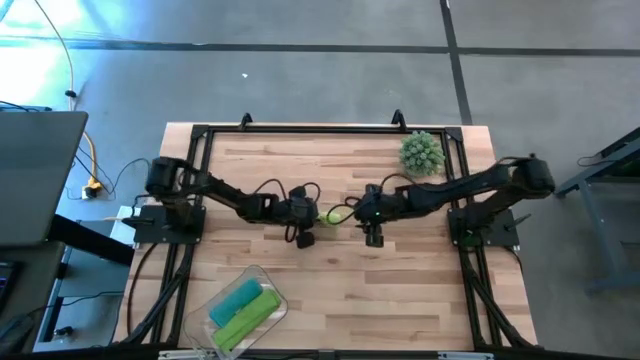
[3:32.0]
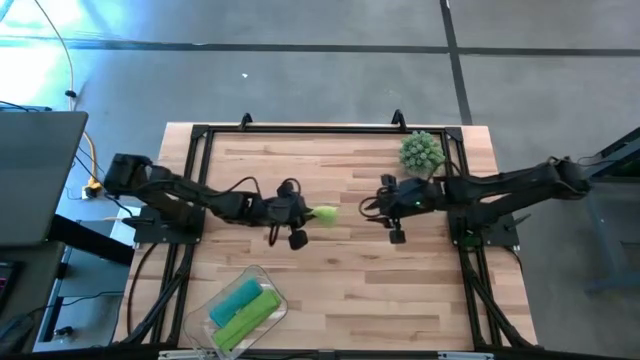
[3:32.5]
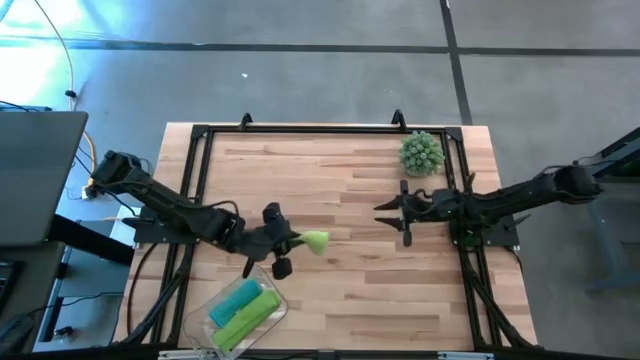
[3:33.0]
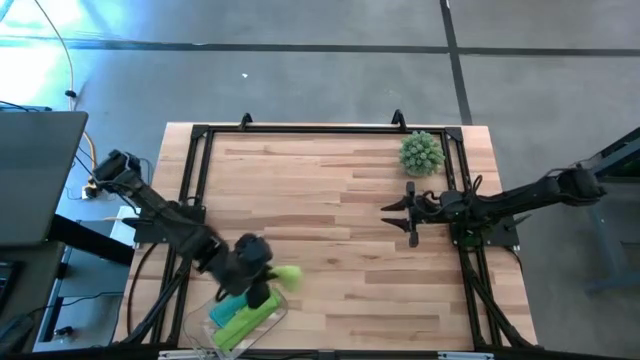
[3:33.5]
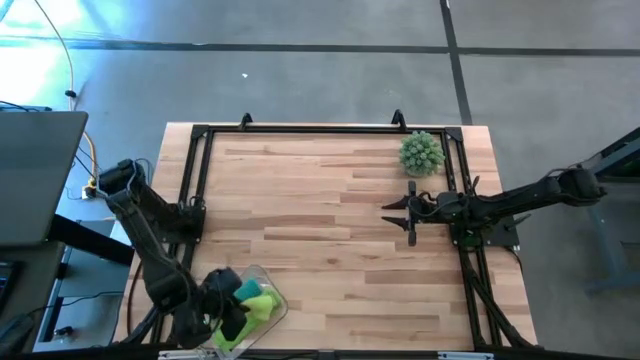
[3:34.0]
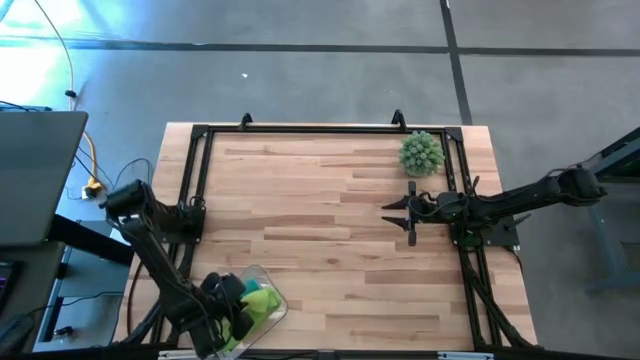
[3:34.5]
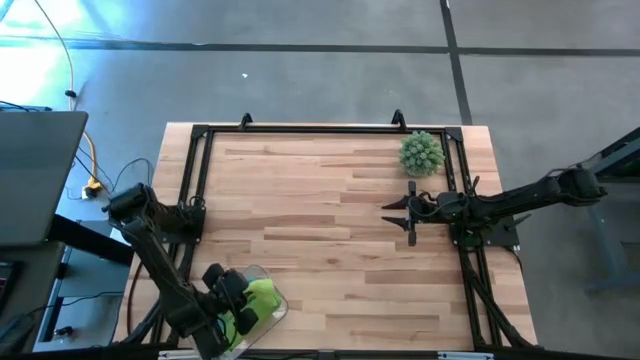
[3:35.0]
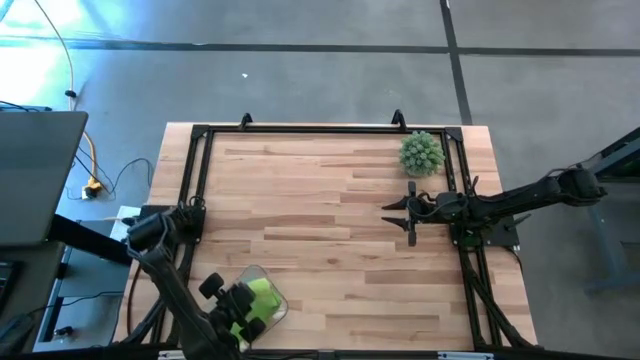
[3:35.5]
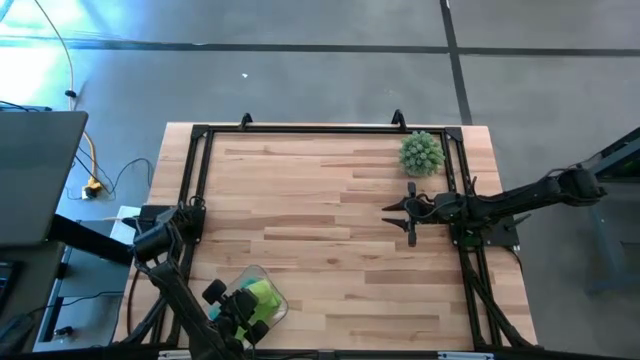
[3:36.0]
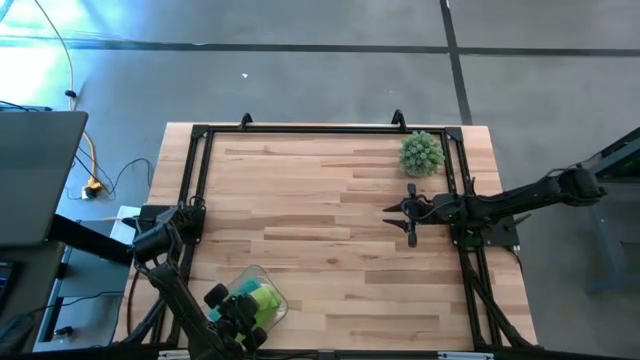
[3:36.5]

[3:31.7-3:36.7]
Task: Roll microfiber towels into tight, uniform cylinder then place into a basket
Put the light green microfiber cloth into the transparent bin

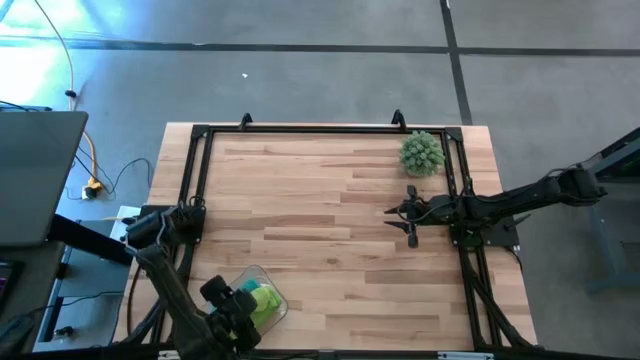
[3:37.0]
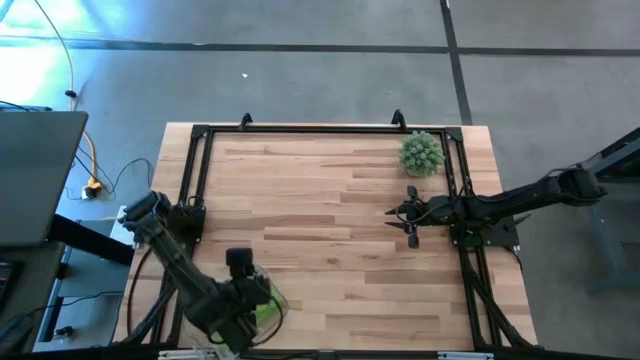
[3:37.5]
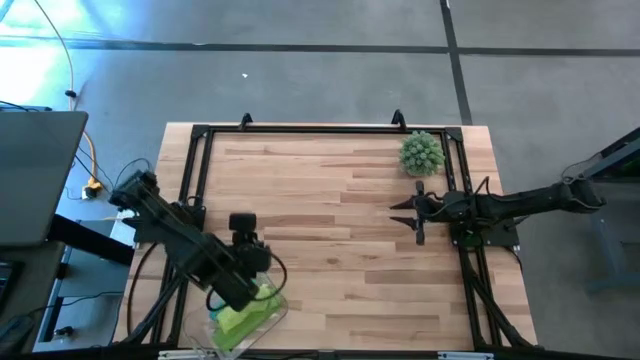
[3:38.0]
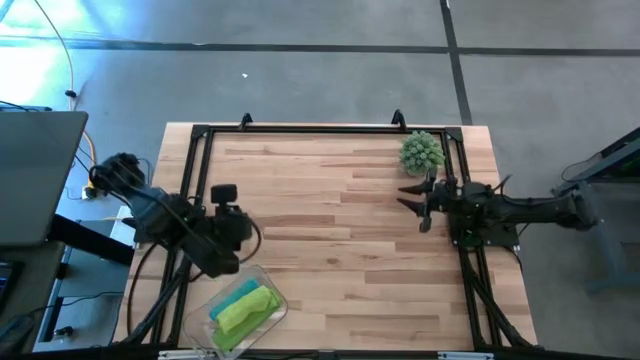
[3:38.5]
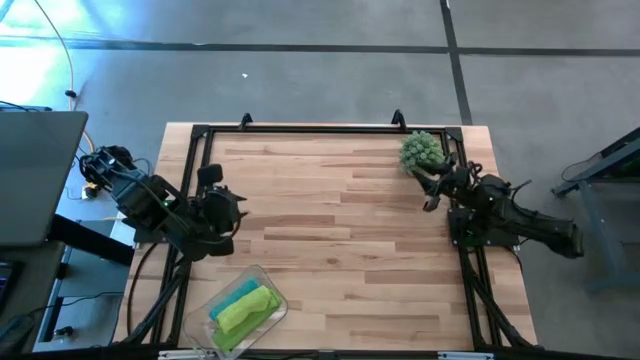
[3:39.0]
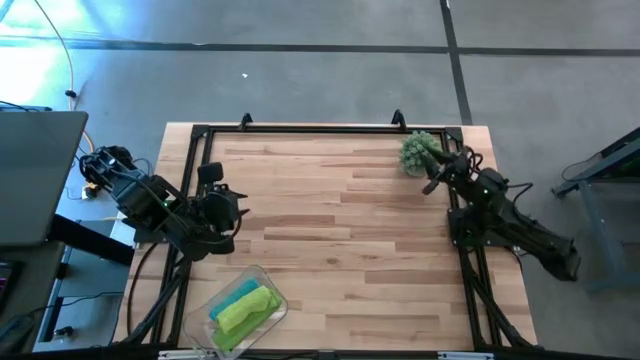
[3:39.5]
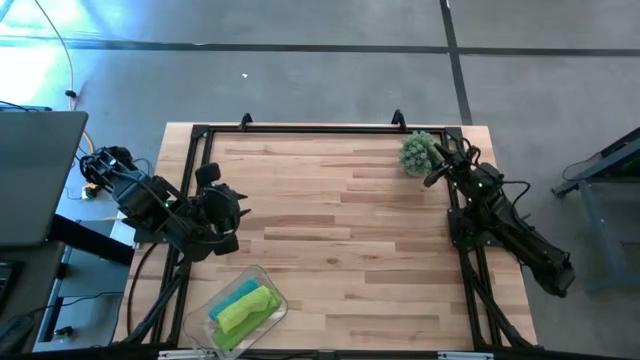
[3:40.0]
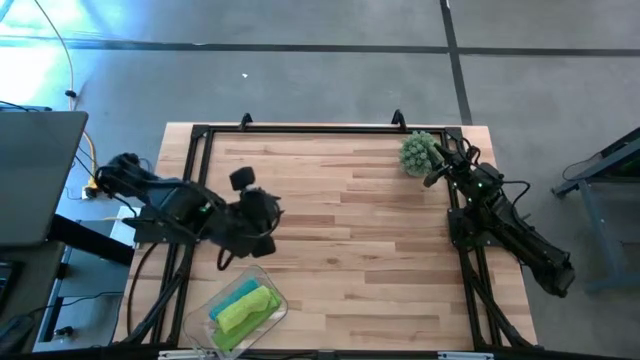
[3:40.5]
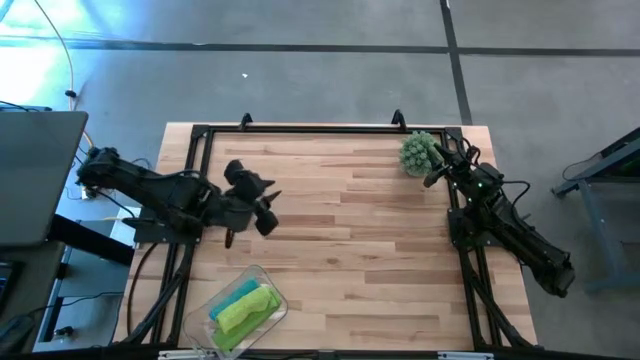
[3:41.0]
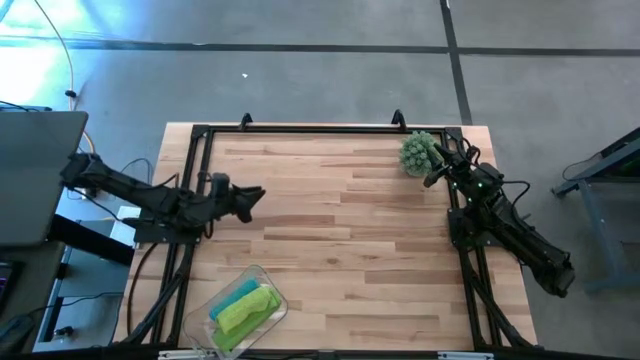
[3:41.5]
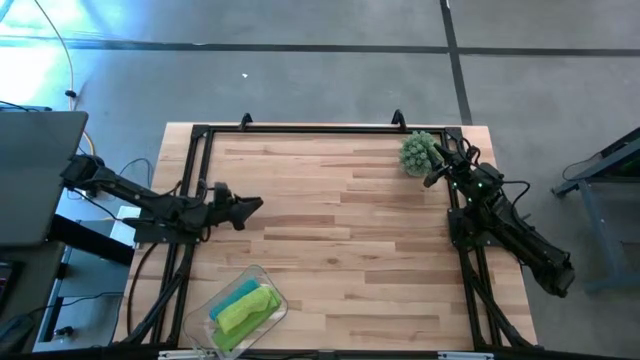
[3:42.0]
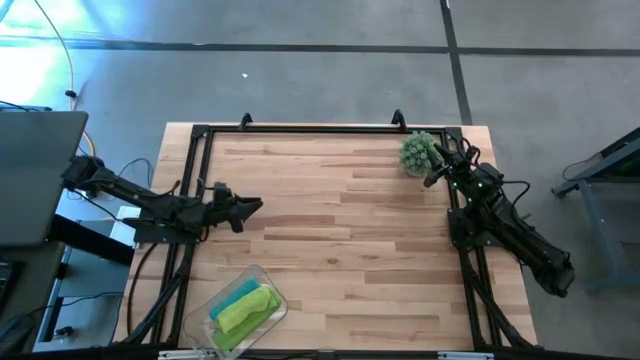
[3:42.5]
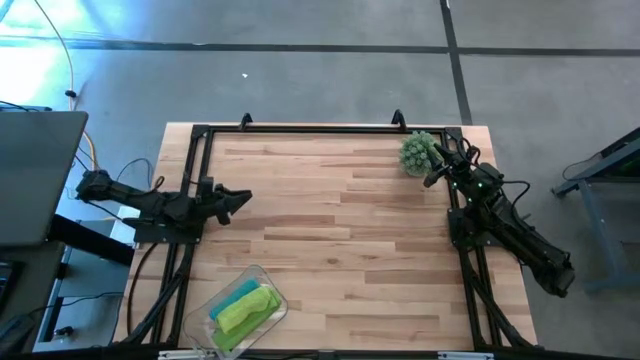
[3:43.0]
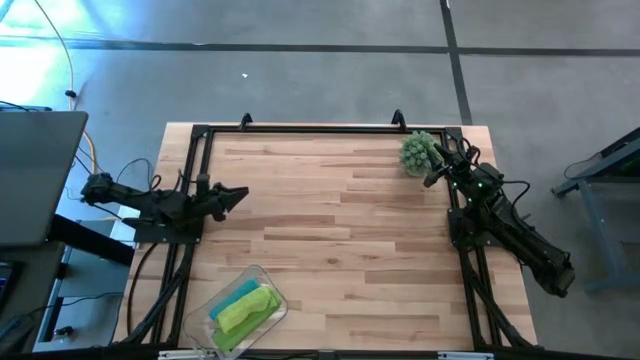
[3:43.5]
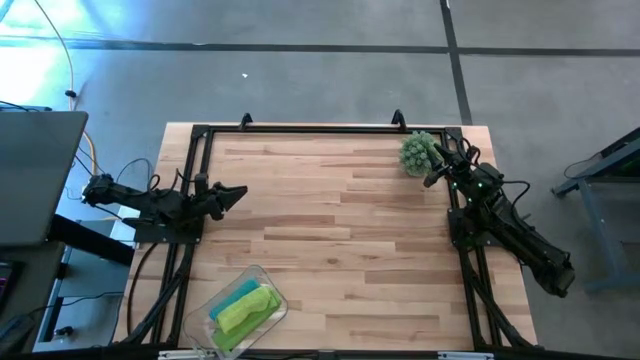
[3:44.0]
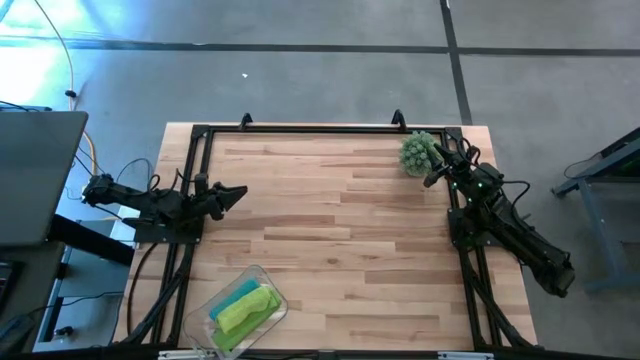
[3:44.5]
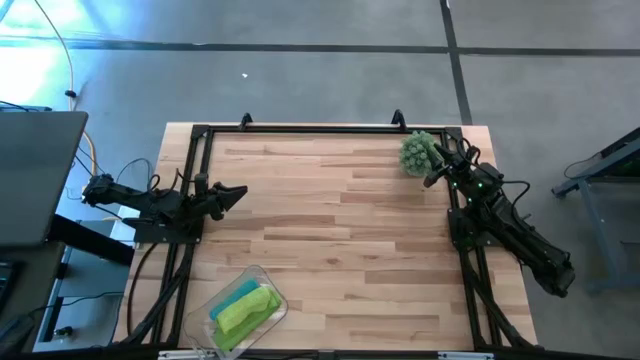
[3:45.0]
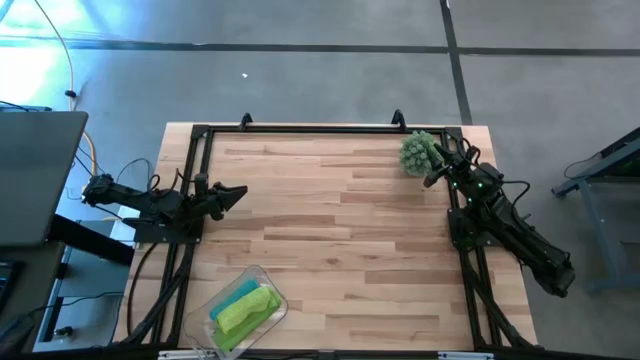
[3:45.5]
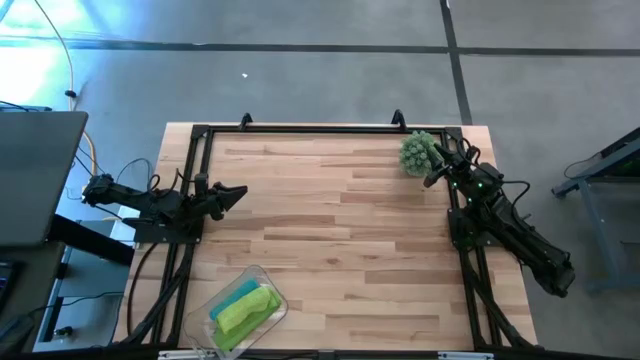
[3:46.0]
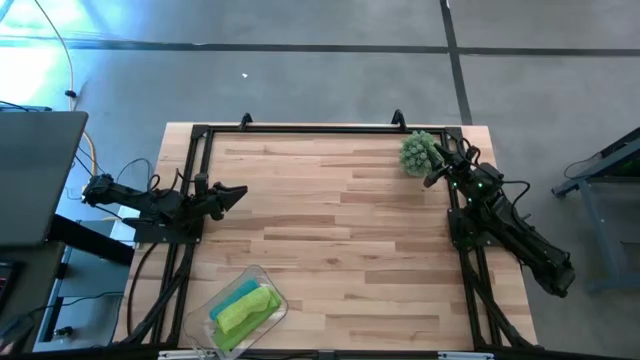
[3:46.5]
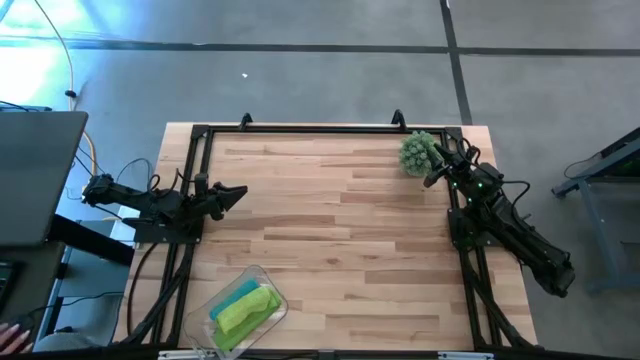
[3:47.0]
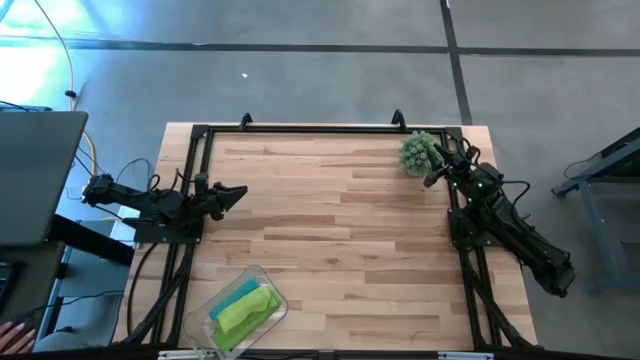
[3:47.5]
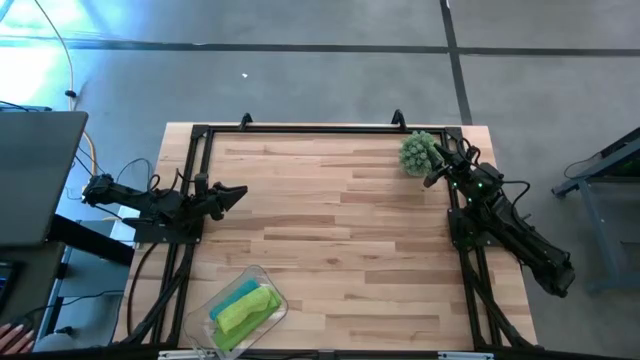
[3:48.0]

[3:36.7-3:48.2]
Return to Home Position

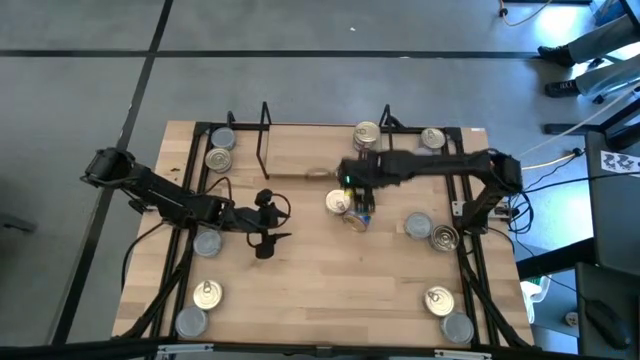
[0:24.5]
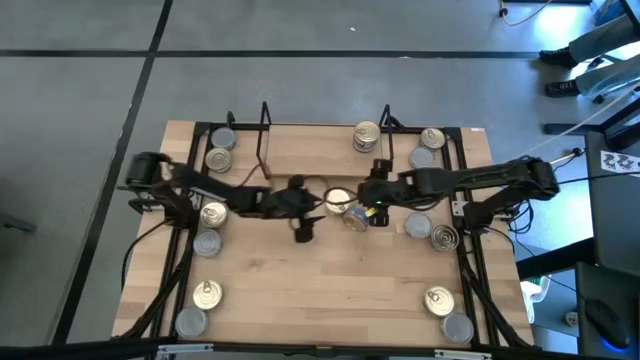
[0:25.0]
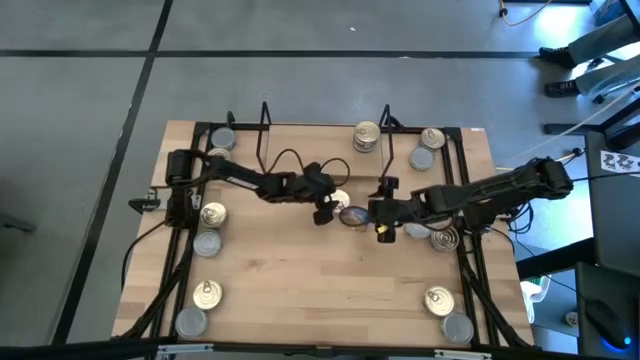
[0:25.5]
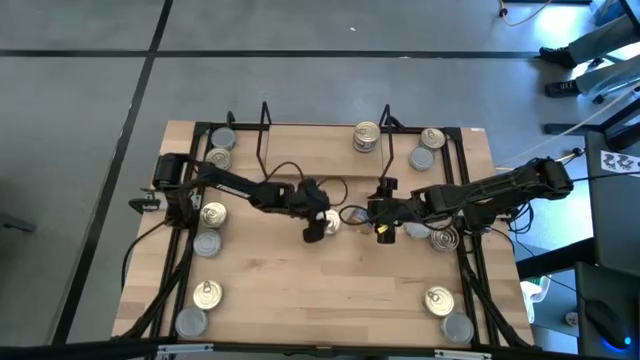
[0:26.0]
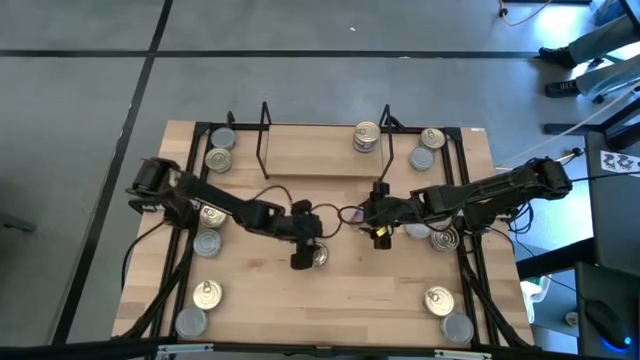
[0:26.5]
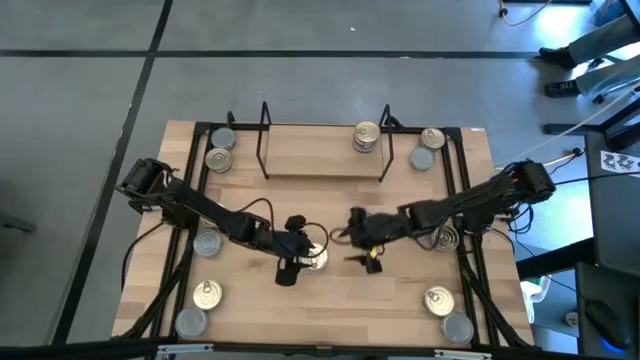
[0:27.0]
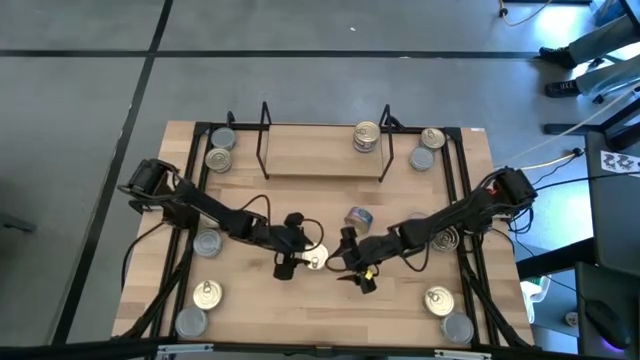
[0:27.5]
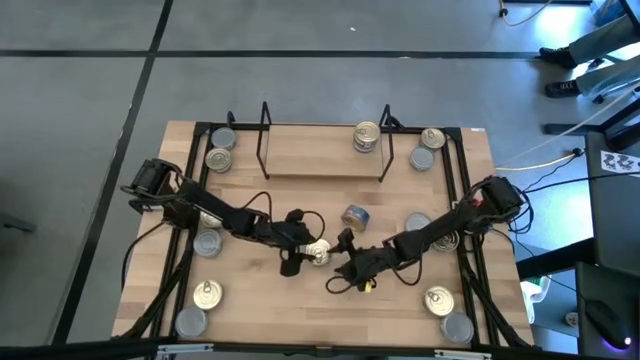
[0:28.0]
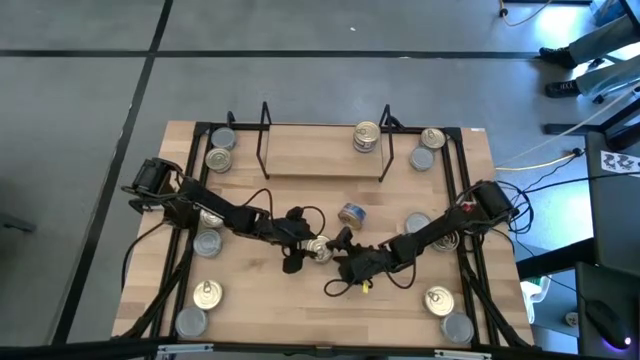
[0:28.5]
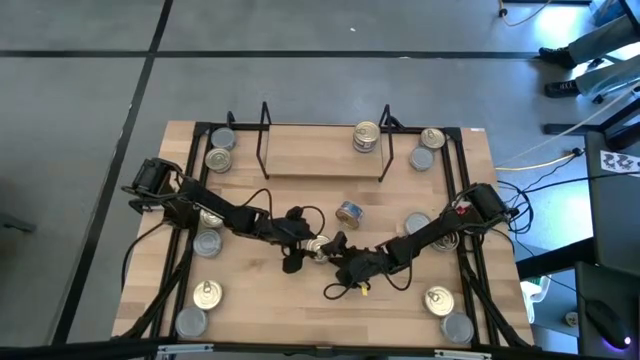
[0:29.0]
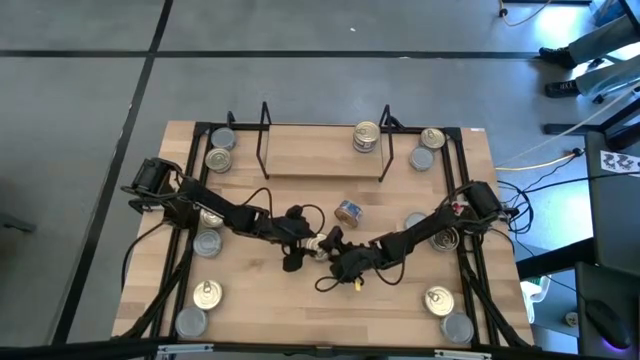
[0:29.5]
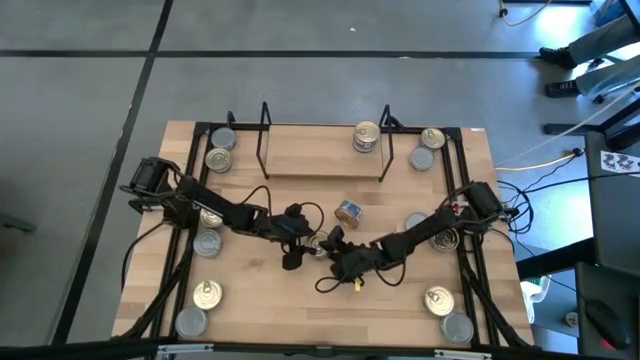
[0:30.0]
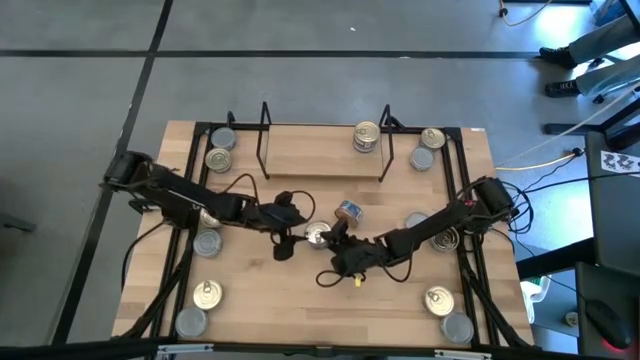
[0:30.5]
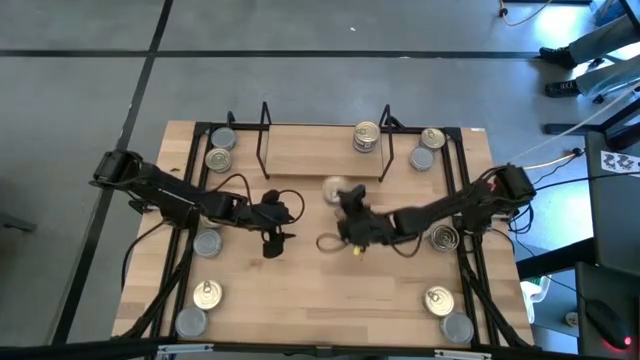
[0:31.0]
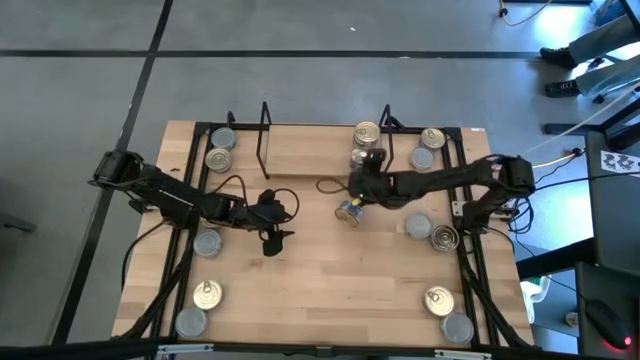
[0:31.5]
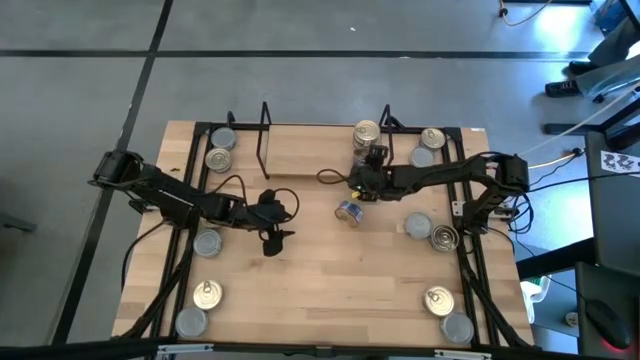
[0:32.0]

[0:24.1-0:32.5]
Task: Stack canned seafood by type on shelf
Put the blue-pink tuna can on the shelf
